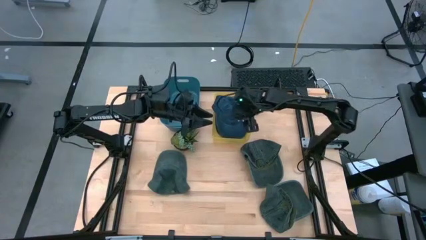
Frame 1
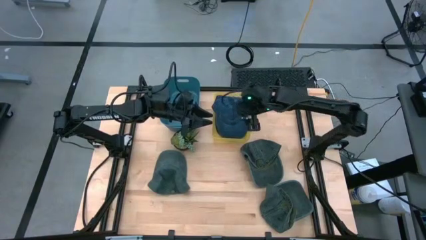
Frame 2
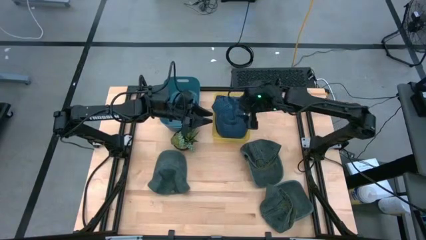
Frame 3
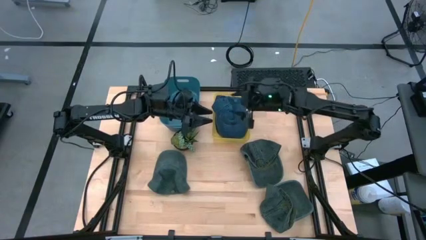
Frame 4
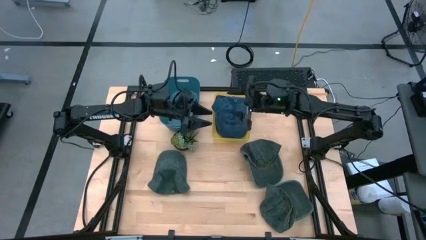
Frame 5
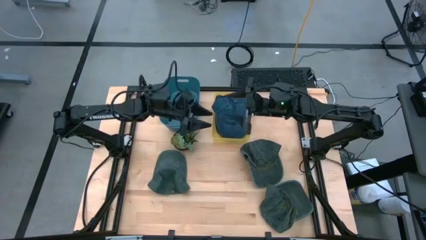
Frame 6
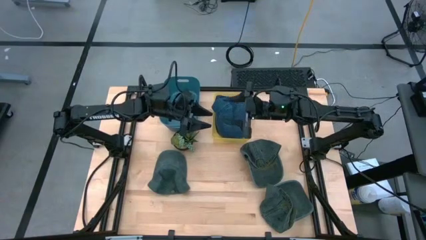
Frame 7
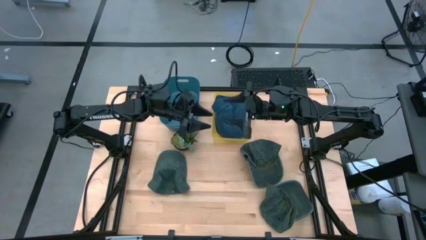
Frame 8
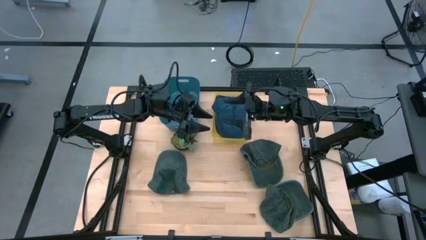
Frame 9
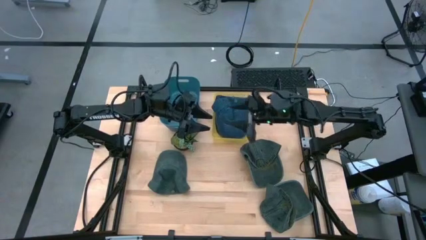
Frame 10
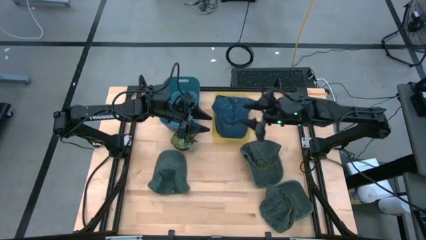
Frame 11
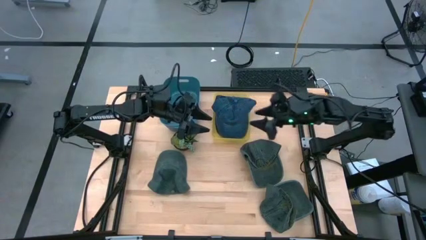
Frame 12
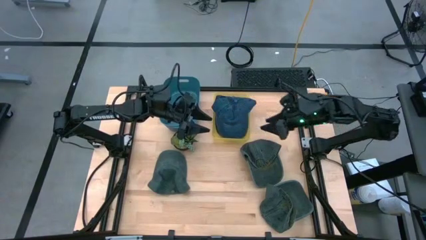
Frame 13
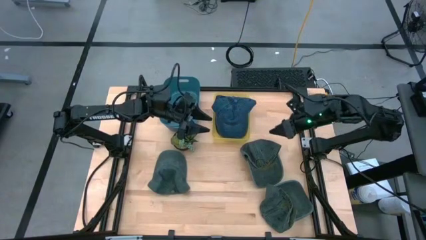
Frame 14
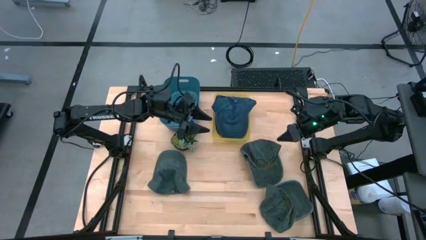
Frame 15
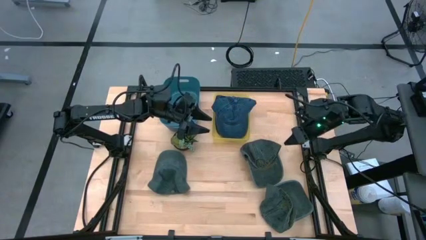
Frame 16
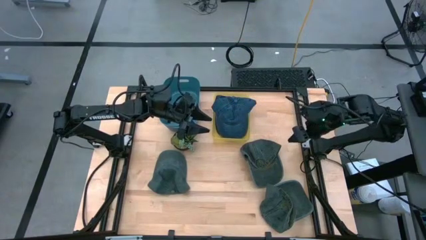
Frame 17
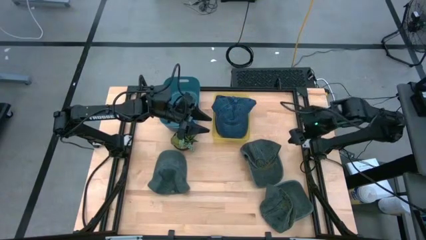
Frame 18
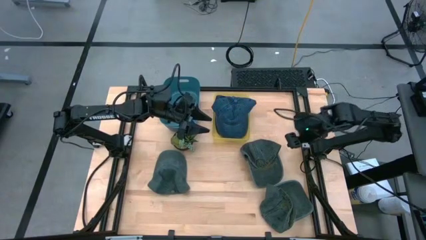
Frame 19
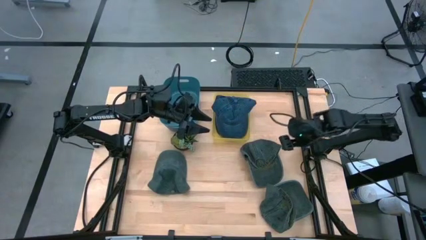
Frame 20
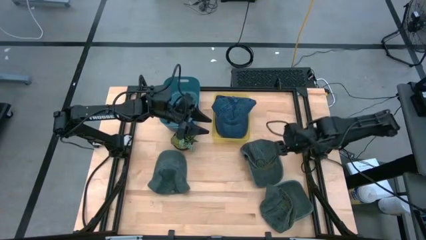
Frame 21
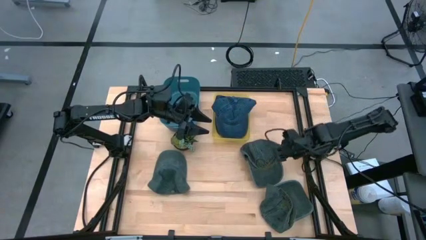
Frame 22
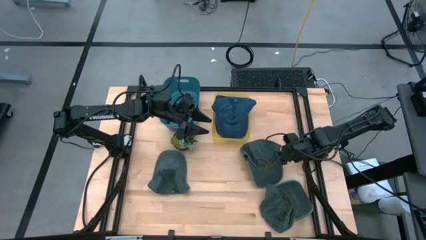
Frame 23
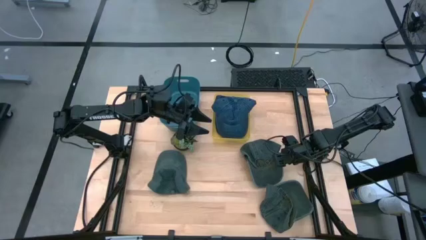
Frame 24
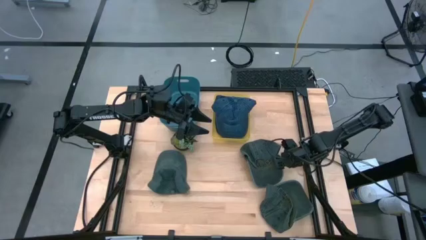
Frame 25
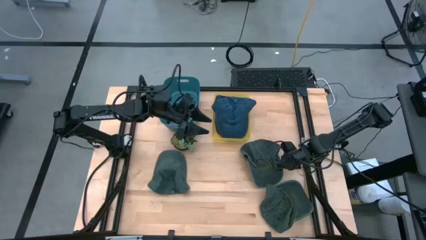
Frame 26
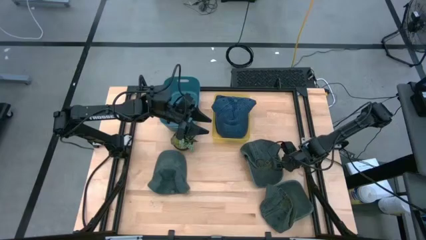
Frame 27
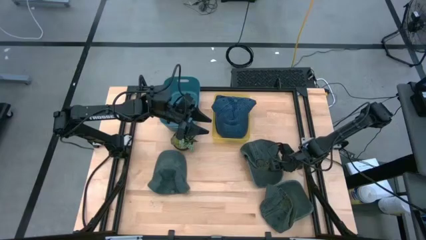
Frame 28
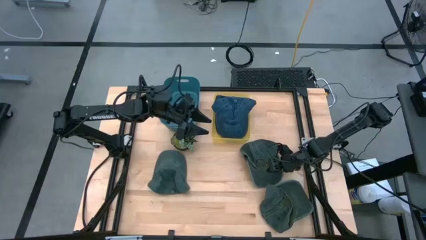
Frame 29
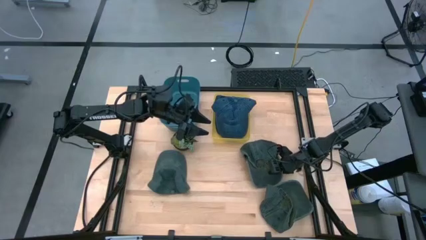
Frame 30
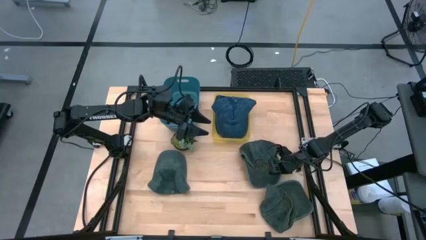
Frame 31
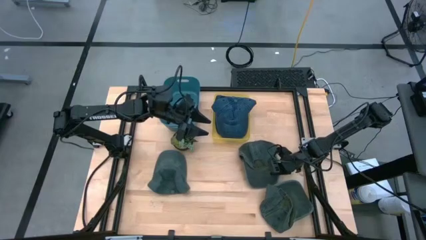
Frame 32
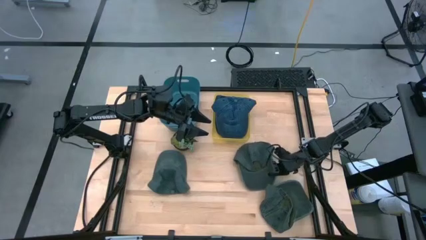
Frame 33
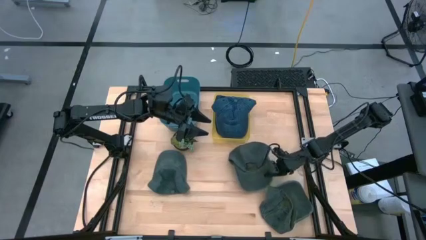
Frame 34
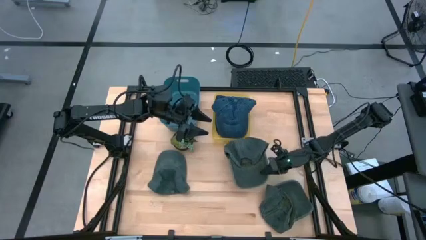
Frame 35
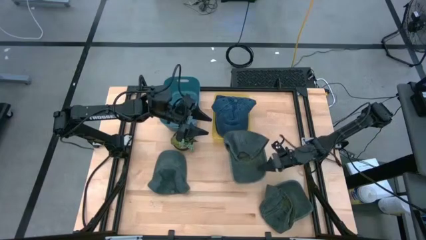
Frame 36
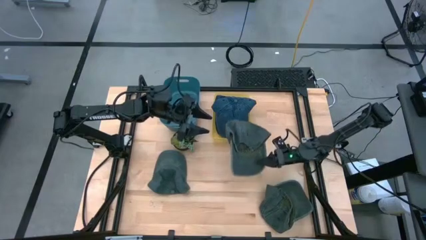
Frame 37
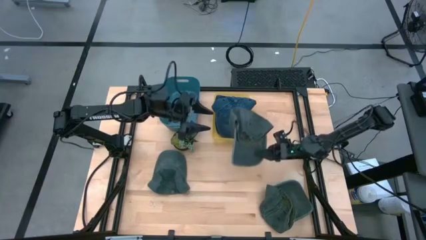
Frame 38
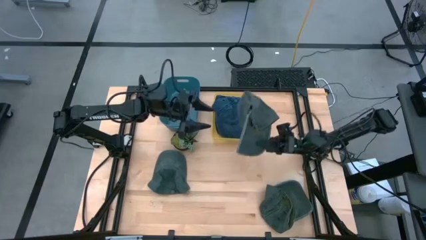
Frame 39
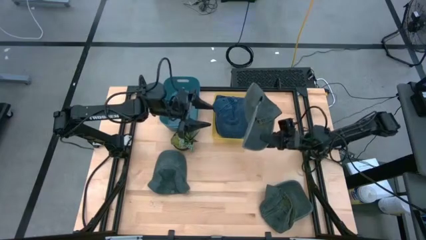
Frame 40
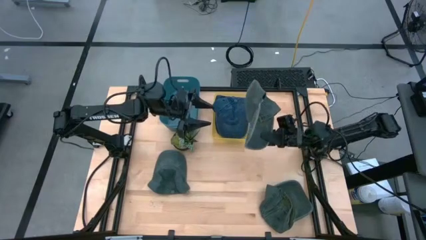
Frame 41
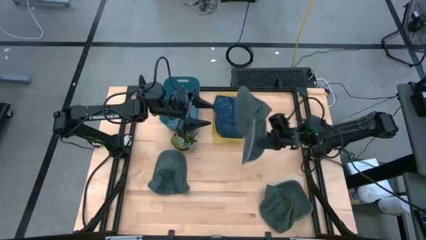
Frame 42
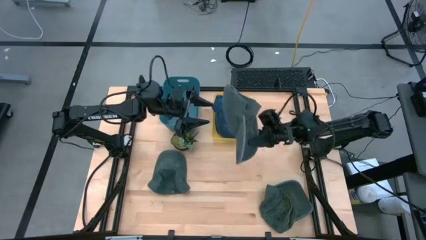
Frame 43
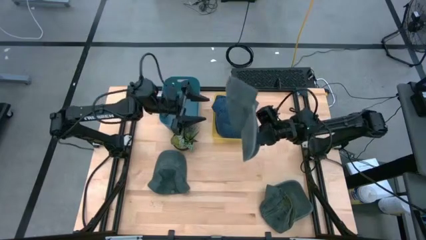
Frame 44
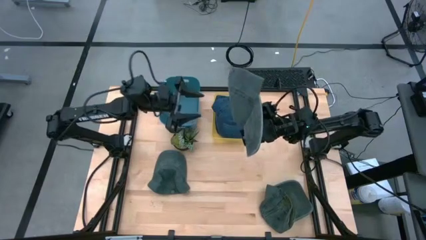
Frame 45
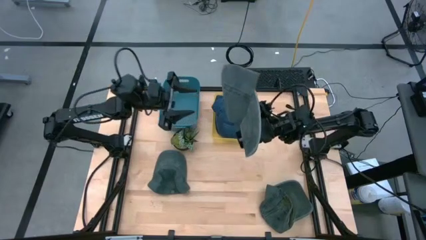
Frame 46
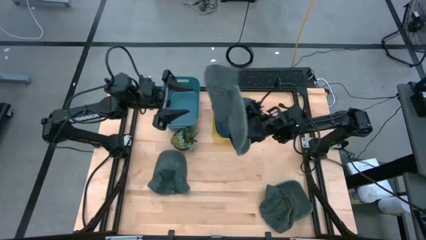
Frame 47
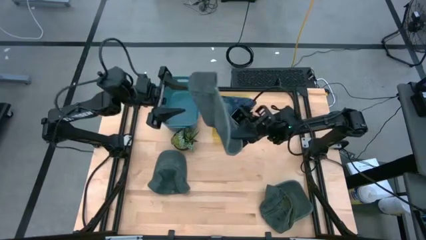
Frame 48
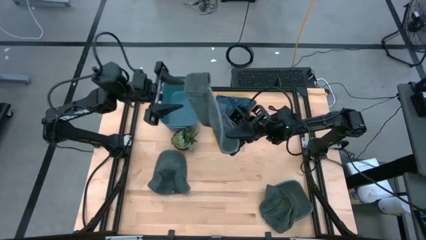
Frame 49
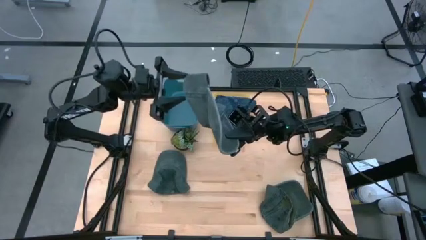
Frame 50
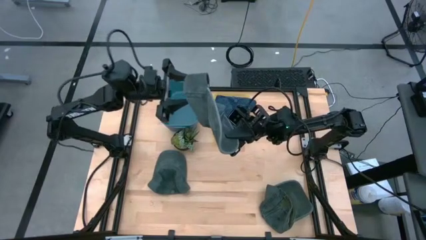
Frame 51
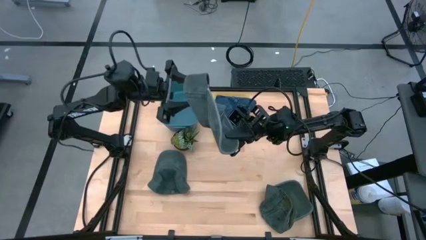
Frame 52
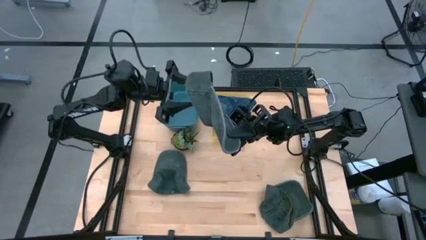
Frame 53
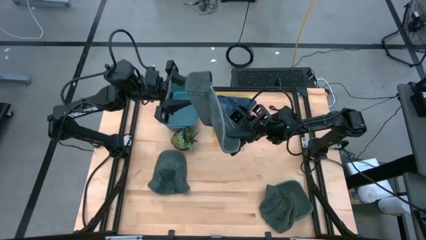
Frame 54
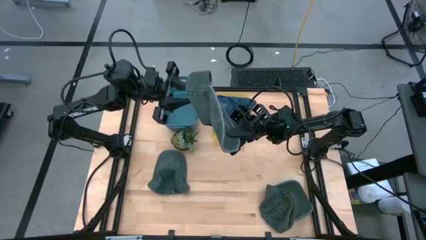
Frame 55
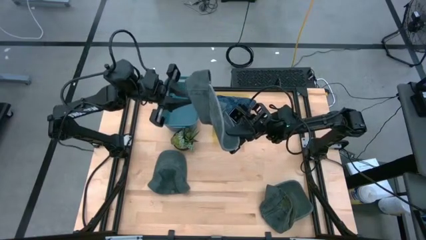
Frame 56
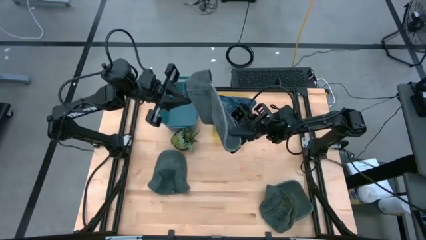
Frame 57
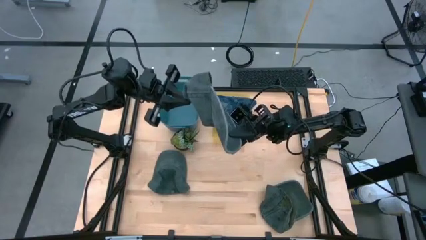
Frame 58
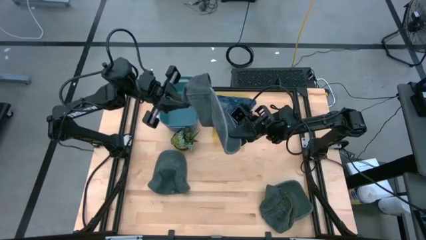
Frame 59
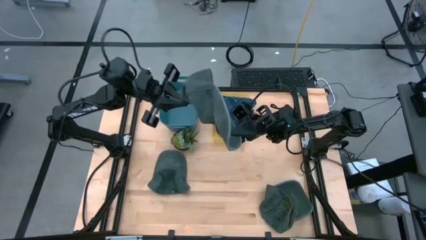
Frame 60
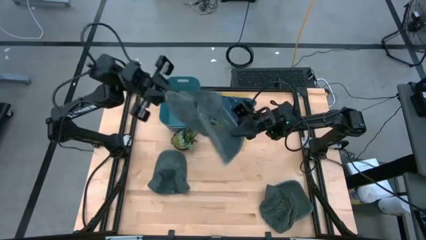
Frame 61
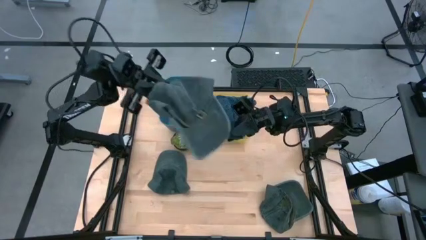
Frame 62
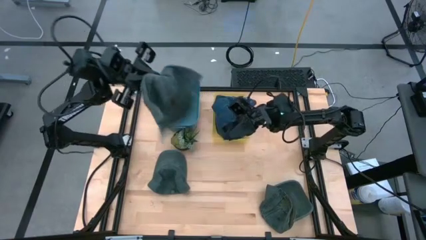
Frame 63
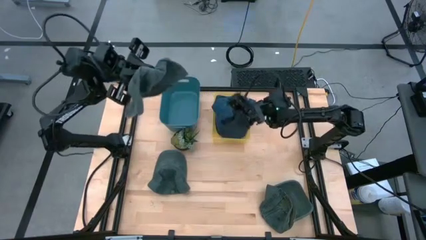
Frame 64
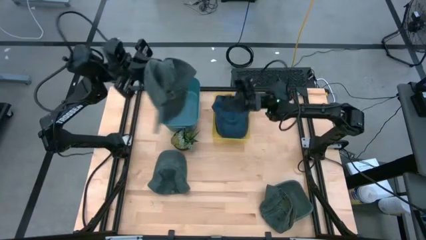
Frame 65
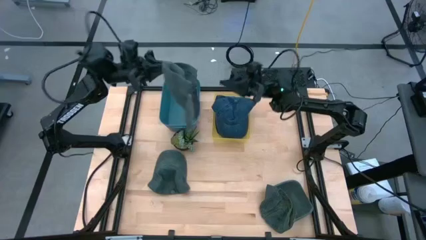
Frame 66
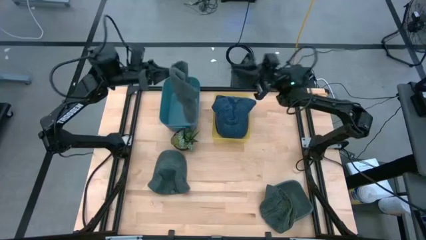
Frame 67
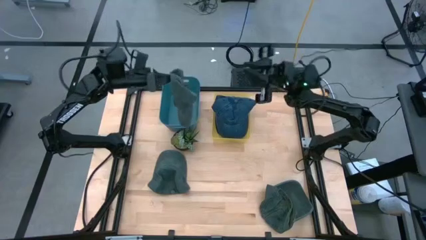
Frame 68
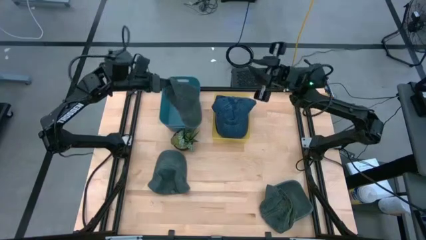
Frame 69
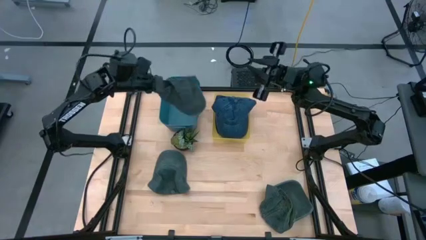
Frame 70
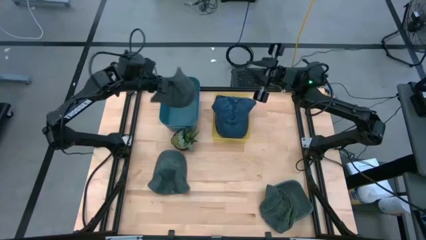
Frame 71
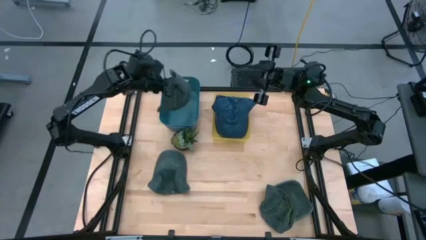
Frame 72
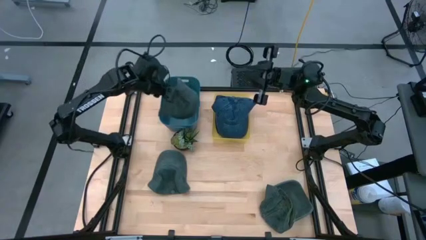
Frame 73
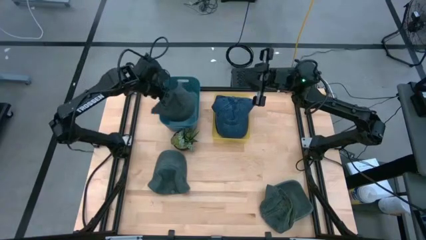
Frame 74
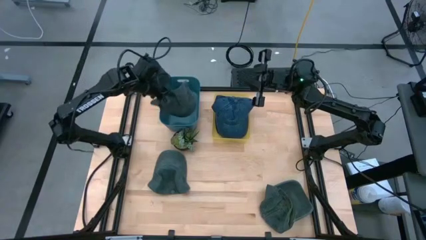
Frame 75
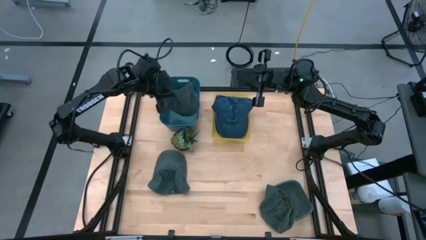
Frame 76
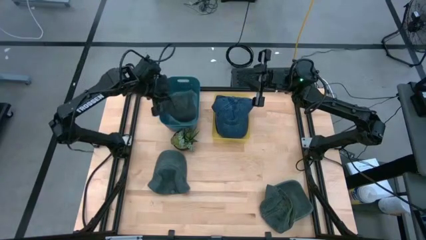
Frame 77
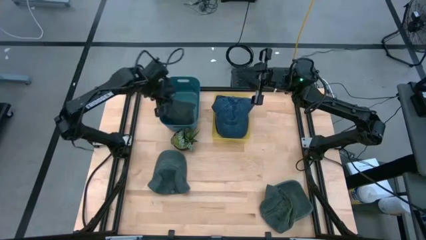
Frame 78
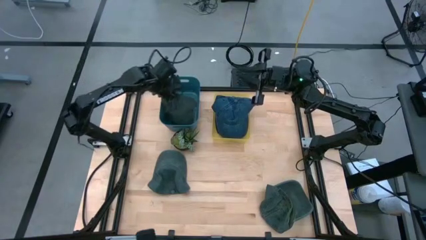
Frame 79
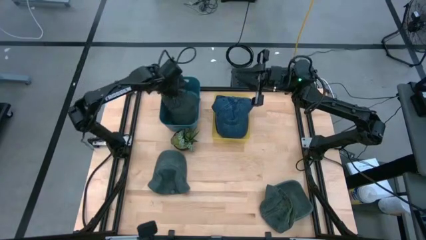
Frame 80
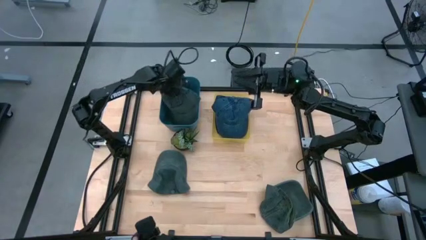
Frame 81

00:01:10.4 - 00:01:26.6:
Task: Pick & Place hat
Put the top right black cap into the blue bin
